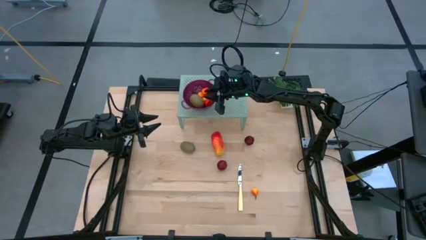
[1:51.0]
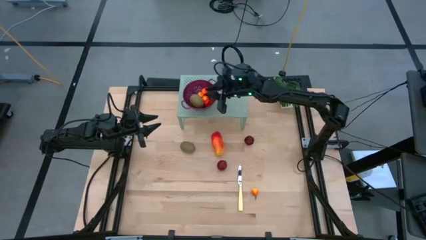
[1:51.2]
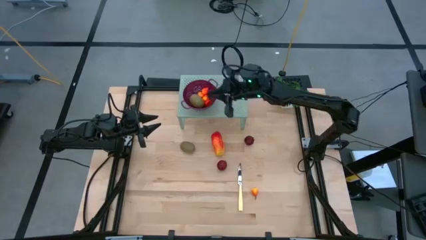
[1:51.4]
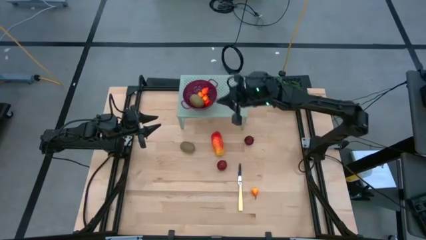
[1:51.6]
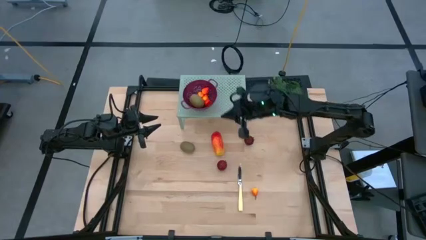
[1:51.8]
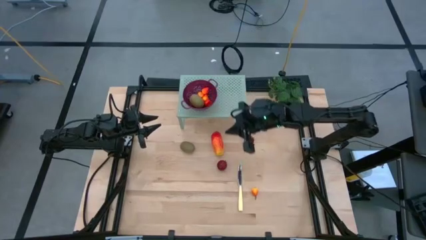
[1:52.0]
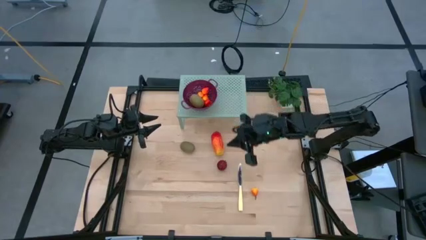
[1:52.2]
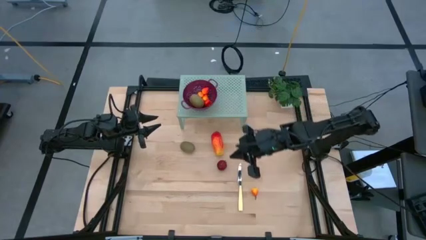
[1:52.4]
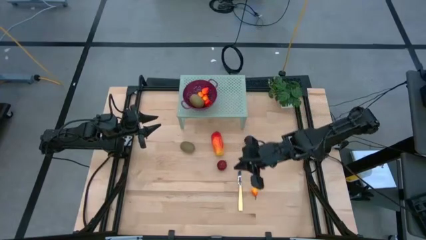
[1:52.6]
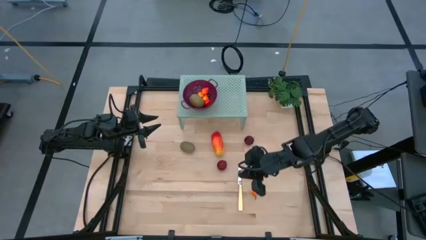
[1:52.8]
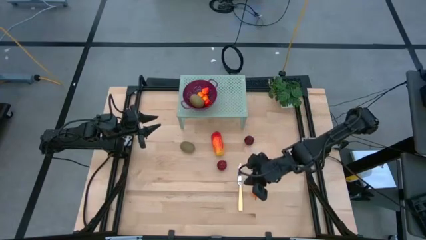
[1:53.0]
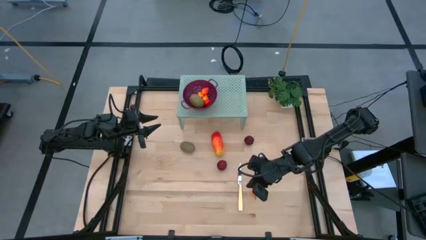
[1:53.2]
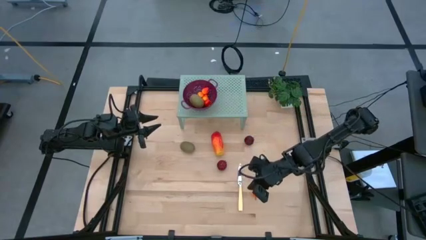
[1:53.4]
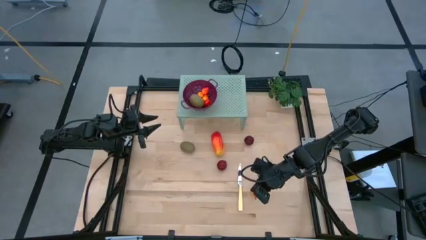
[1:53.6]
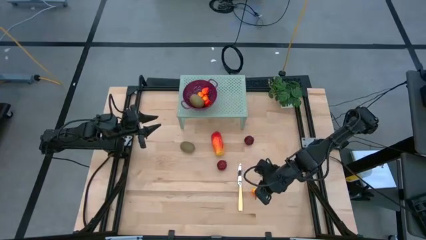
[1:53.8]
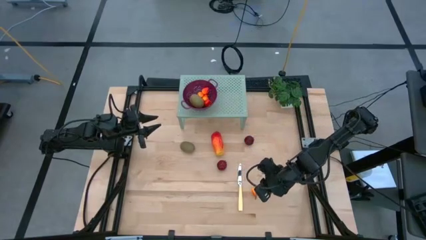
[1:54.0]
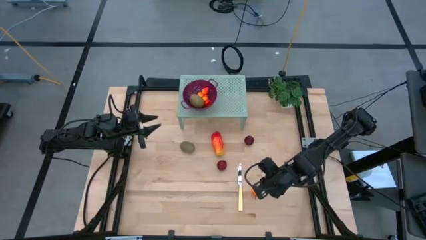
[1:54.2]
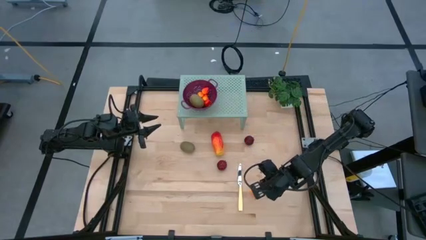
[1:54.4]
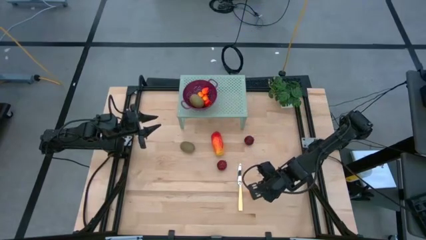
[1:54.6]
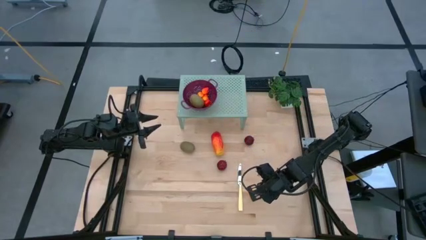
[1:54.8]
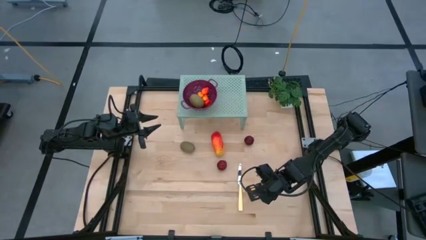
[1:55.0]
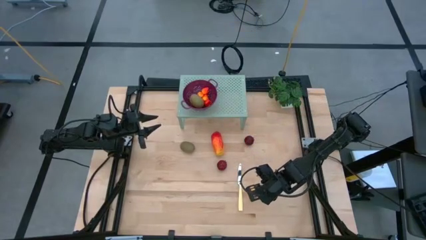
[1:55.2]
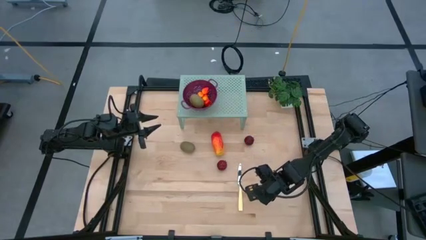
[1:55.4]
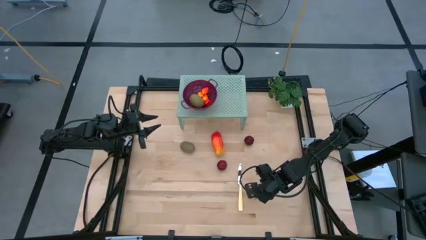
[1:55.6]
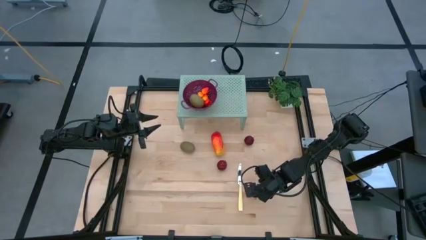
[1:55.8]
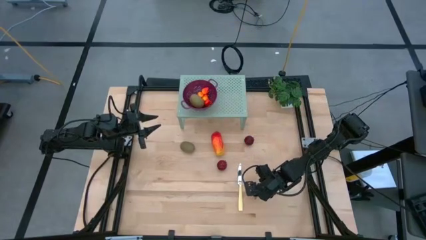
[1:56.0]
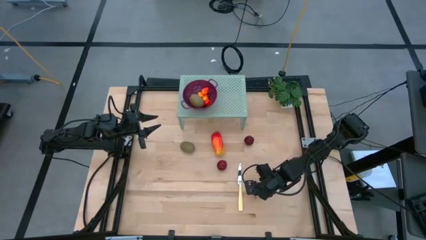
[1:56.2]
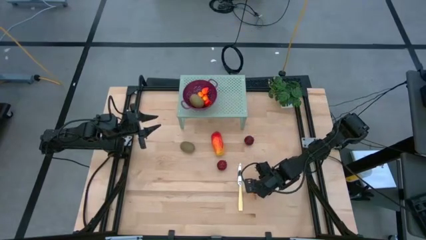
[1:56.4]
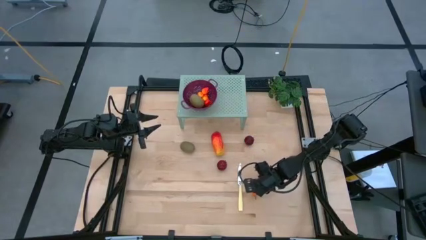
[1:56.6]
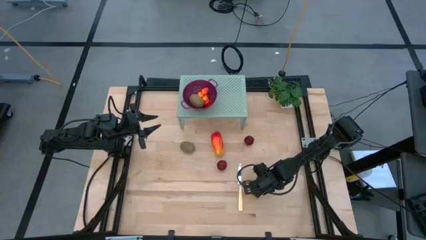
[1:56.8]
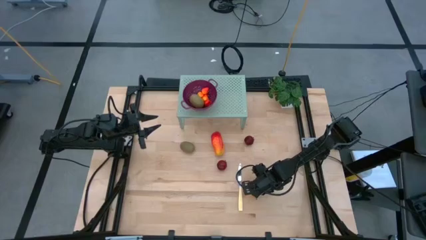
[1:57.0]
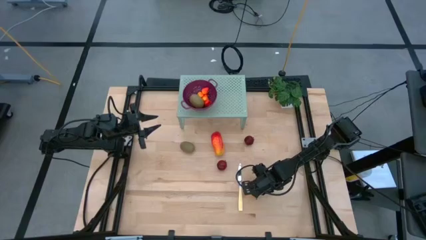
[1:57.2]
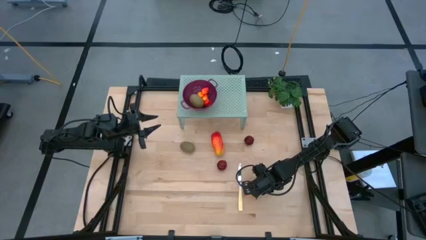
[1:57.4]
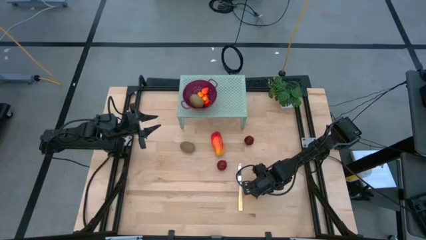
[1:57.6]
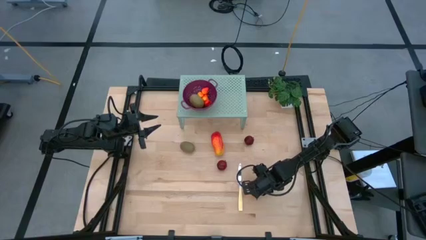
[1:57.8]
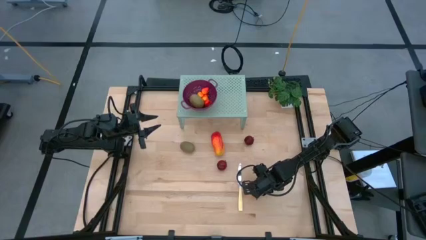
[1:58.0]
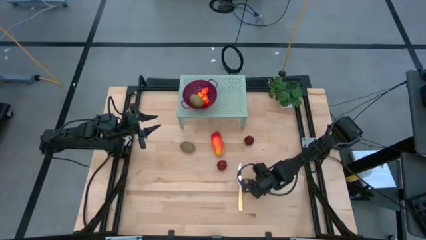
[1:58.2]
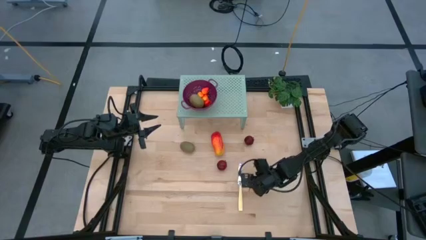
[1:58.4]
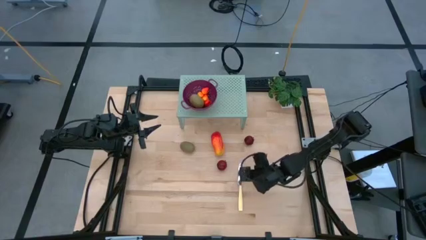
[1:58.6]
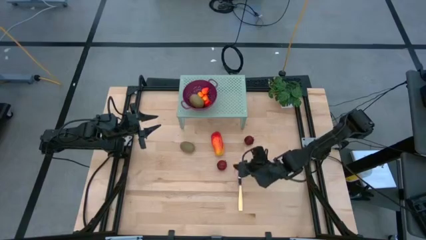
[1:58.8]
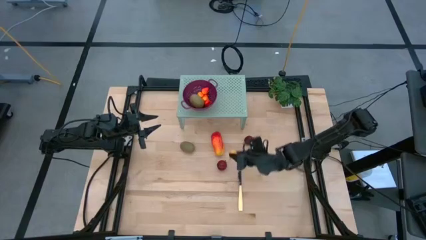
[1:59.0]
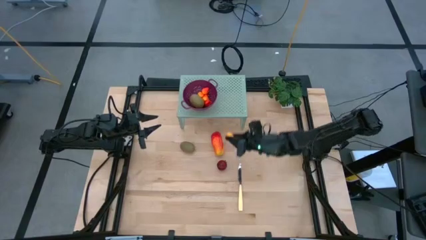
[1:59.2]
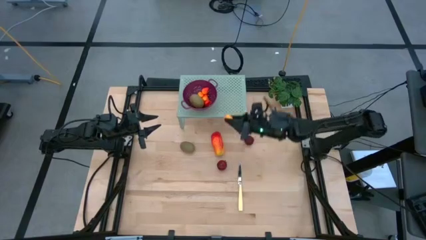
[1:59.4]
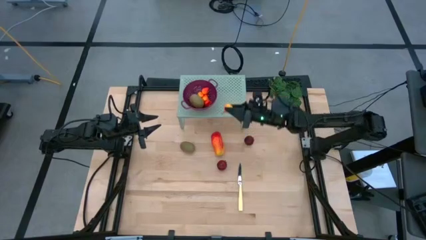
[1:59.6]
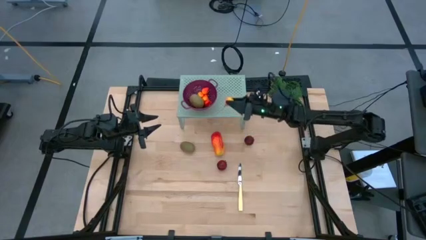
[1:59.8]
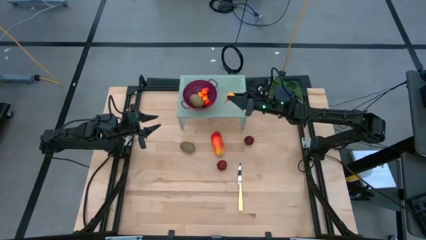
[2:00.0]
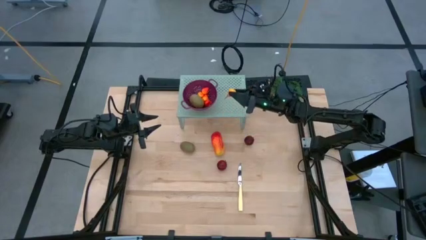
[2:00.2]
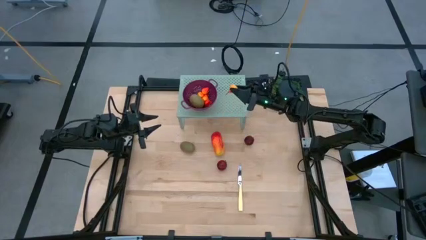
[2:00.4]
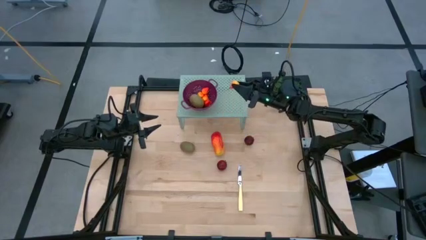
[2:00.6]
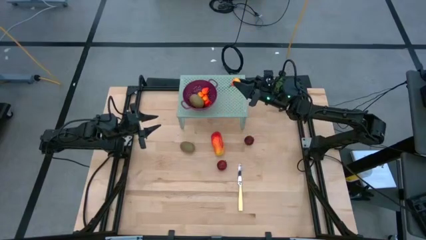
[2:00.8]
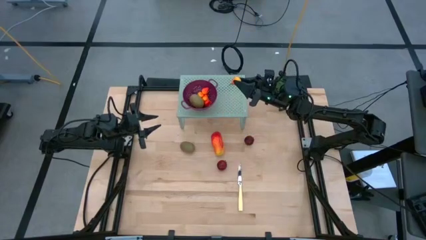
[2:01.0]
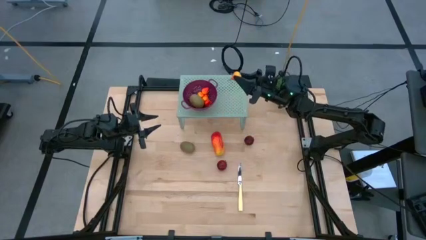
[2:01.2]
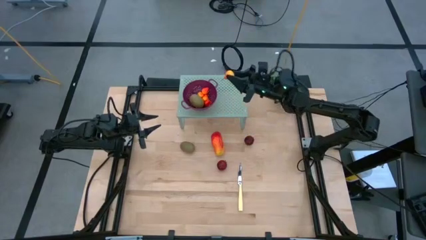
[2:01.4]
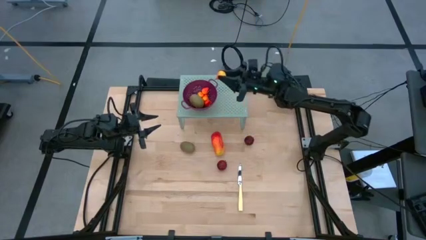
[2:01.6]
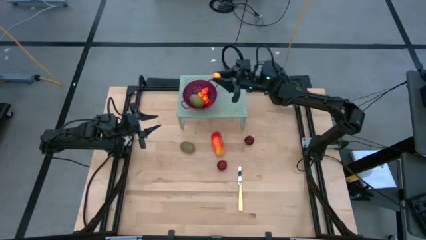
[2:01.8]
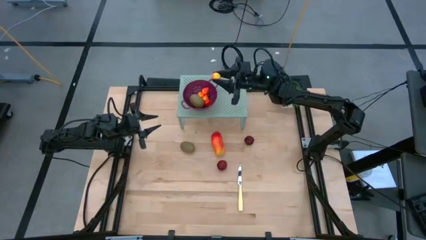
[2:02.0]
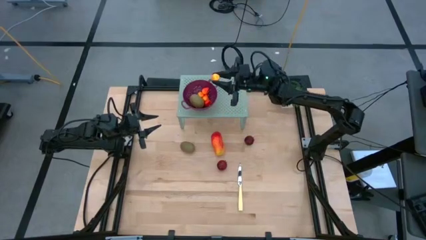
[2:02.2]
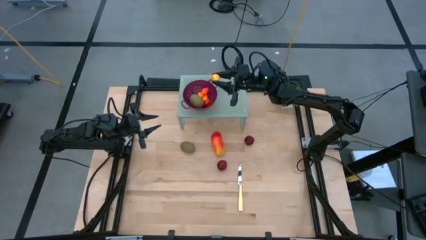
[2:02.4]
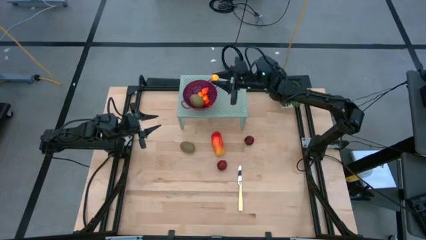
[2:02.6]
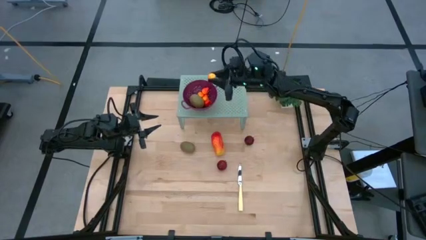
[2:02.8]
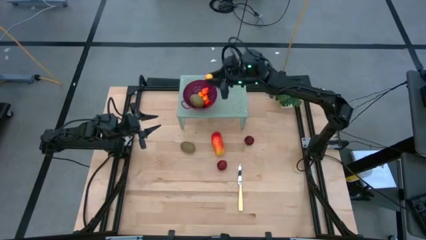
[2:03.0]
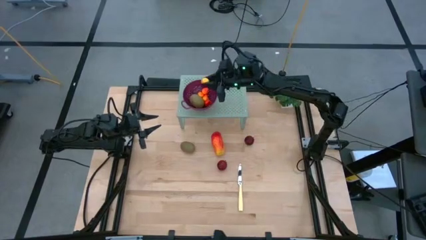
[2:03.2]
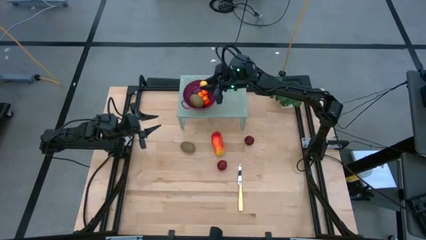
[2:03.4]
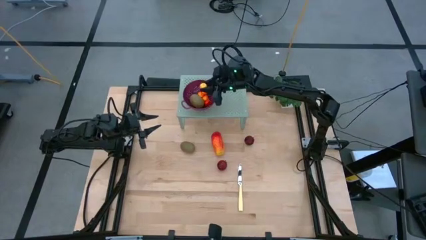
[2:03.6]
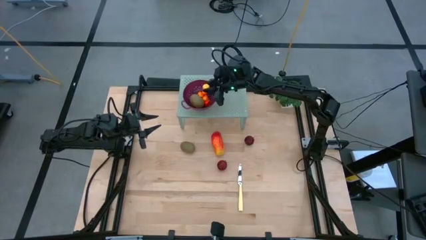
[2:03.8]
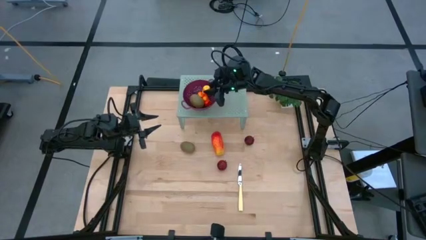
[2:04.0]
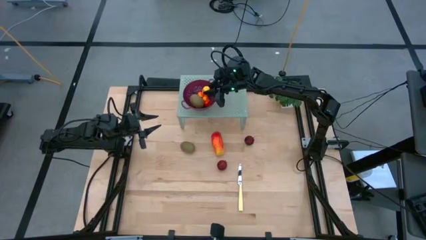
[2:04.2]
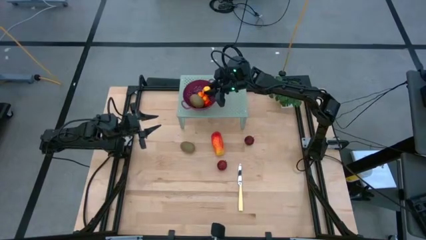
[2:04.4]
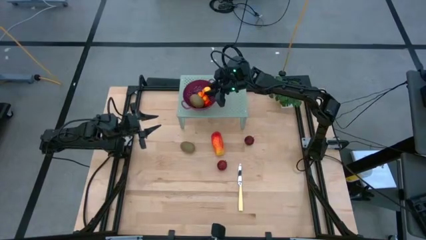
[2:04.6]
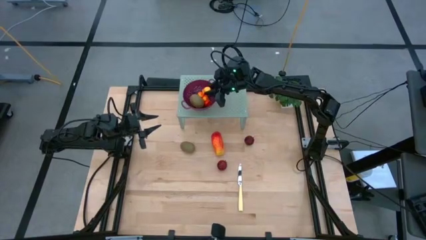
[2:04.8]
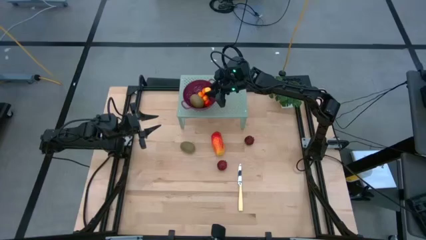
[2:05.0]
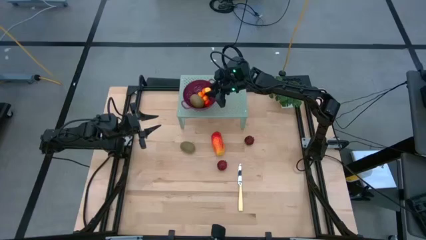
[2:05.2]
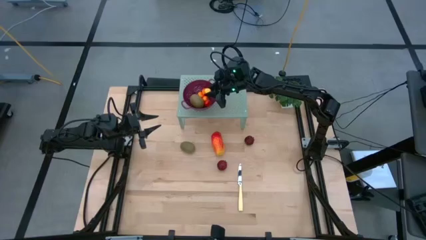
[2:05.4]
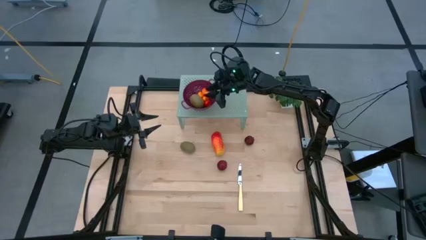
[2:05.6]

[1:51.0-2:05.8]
Task: Pick & Place Fruit
Put the pear into violet strainer bowl on the shelf
